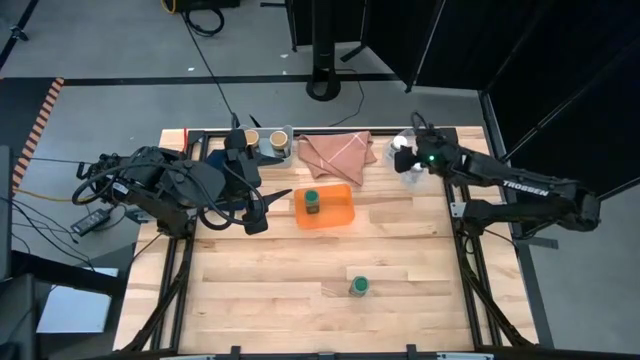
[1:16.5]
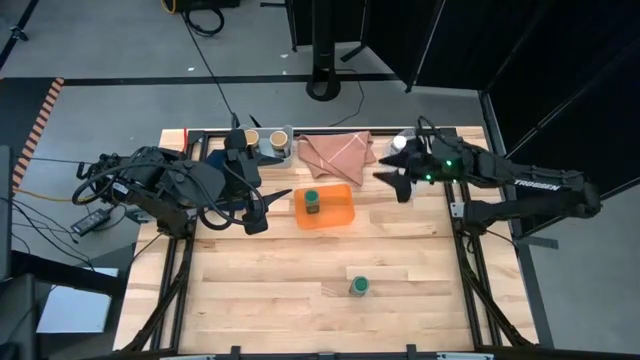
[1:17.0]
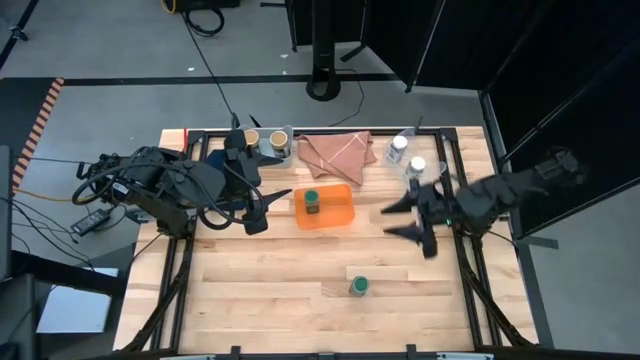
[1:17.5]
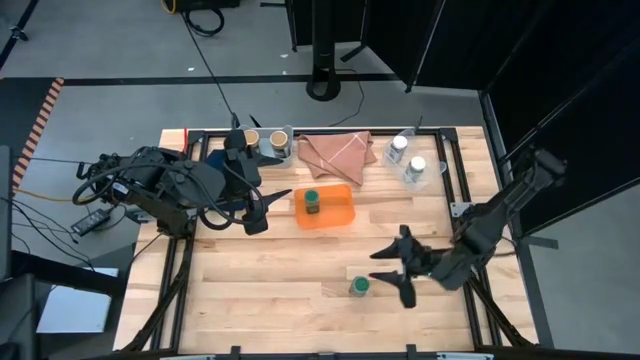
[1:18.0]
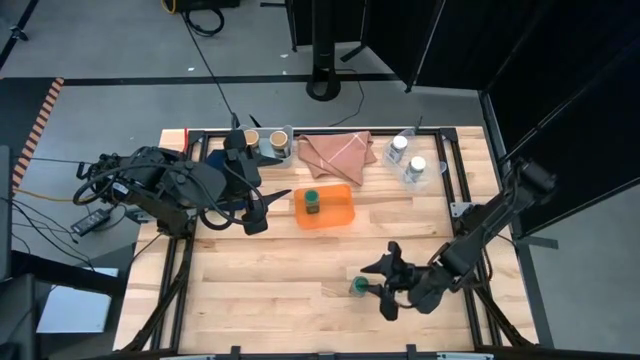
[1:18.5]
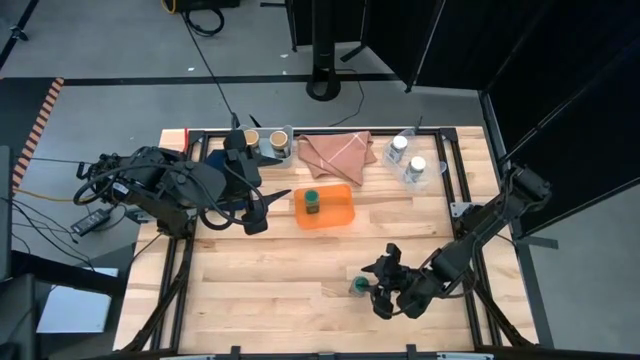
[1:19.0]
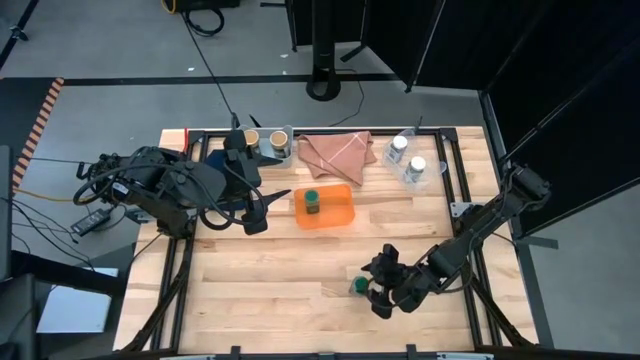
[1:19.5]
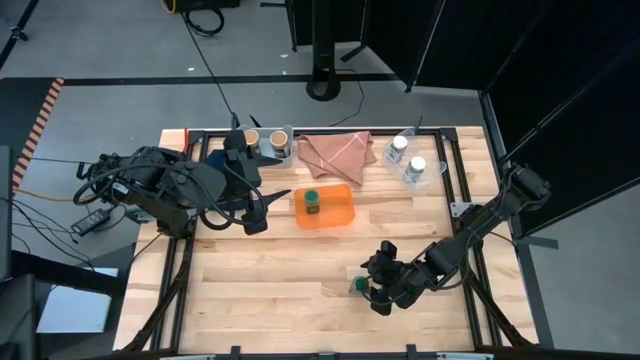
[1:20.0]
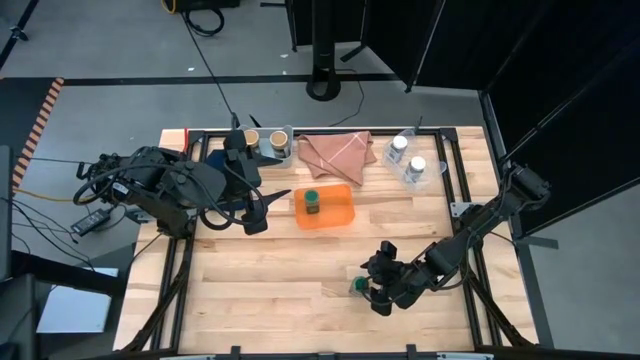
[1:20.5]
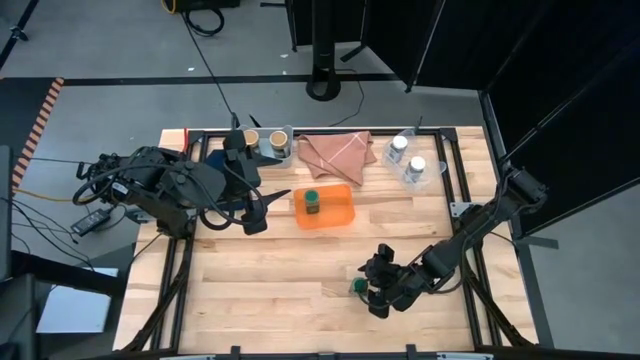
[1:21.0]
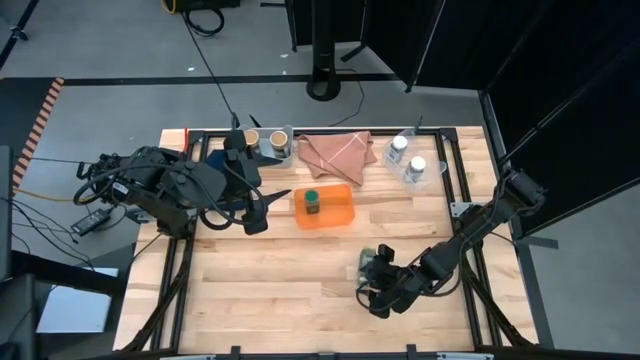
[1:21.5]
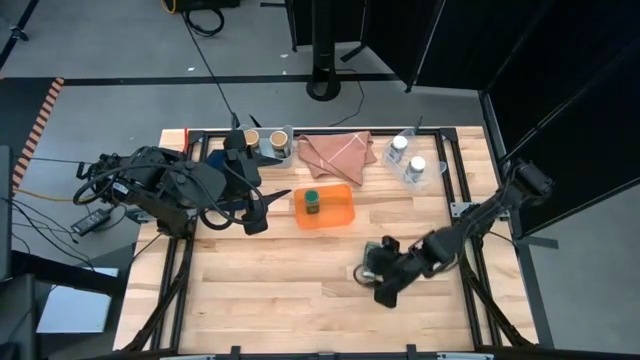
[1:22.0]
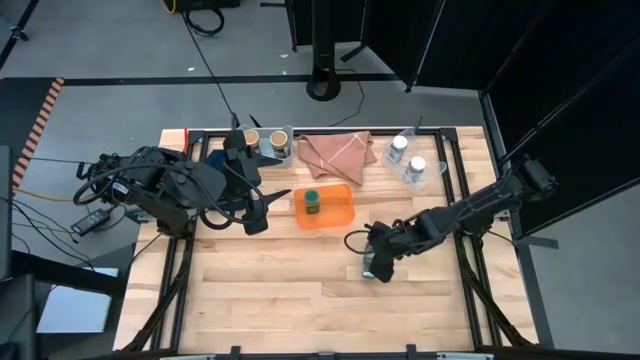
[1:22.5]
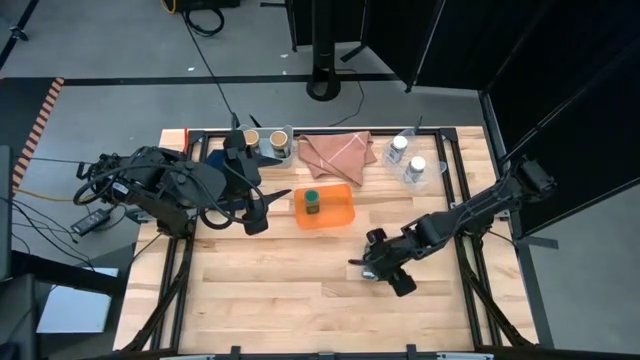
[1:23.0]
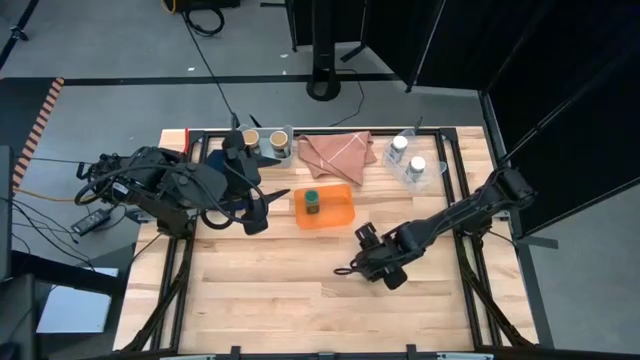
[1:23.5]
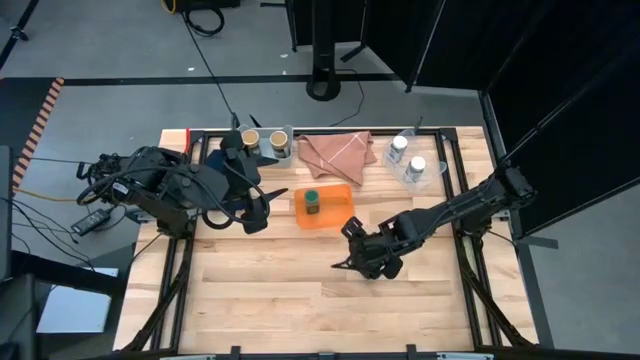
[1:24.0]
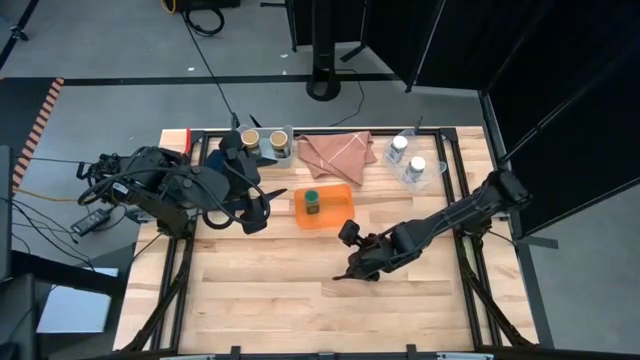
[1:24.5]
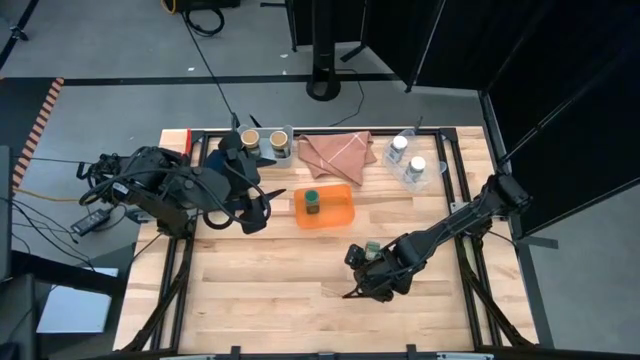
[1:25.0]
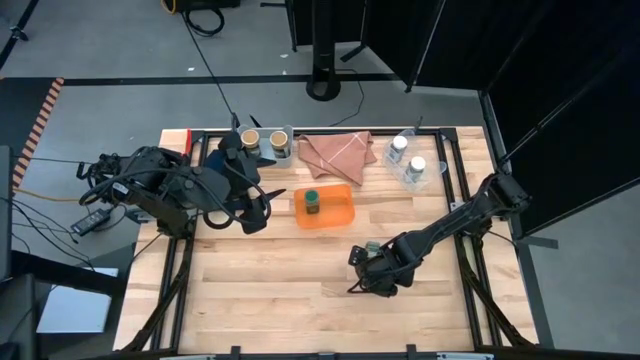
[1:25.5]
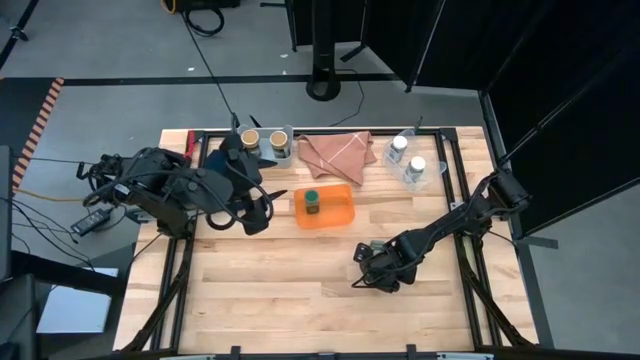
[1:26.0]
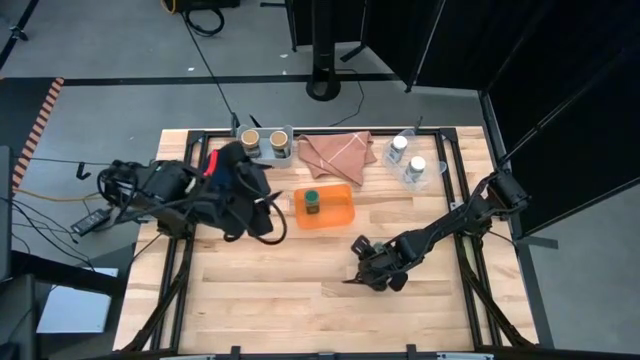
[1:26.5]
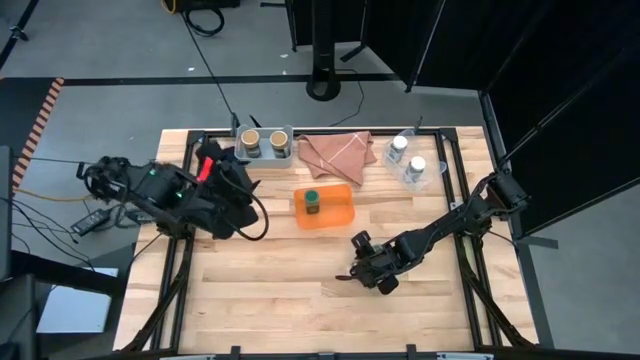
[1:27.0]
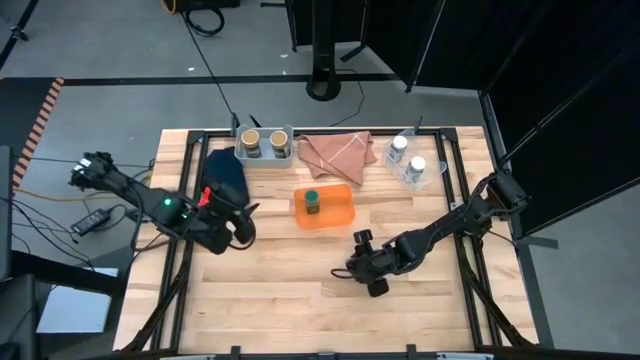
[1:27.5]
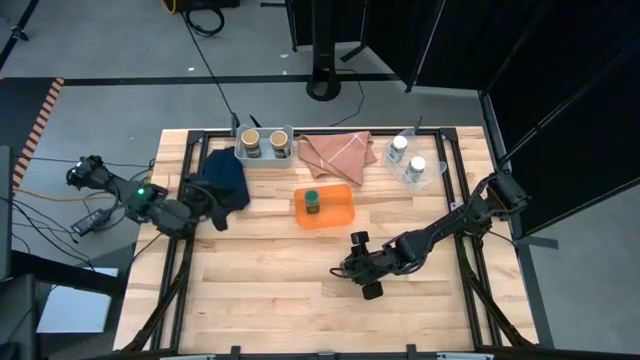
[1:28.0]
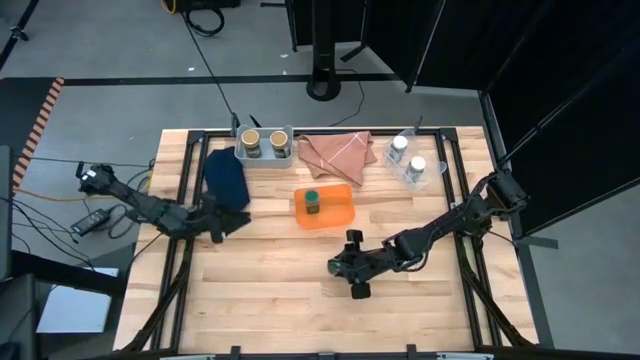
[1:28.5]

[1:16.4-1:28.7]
Task: Sort spices by type
Put the green seasoning bottle into the orange bin

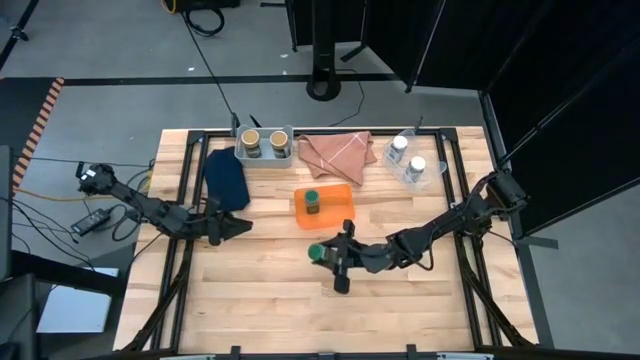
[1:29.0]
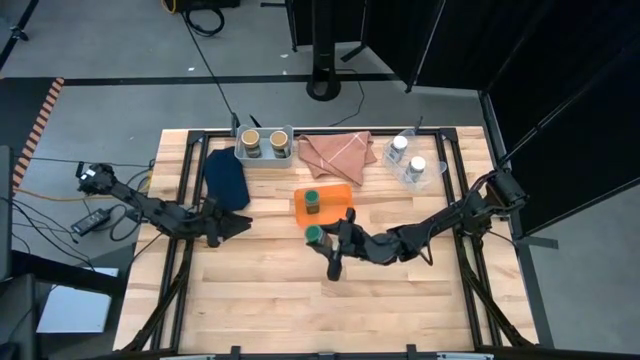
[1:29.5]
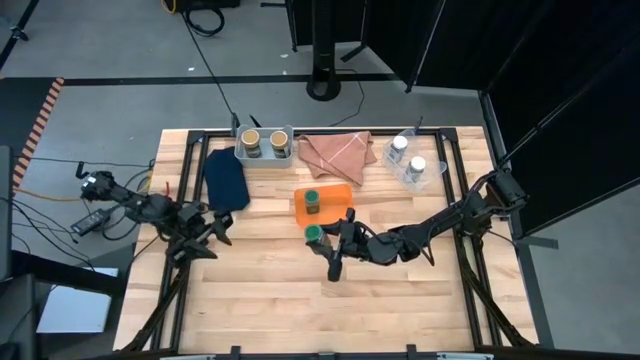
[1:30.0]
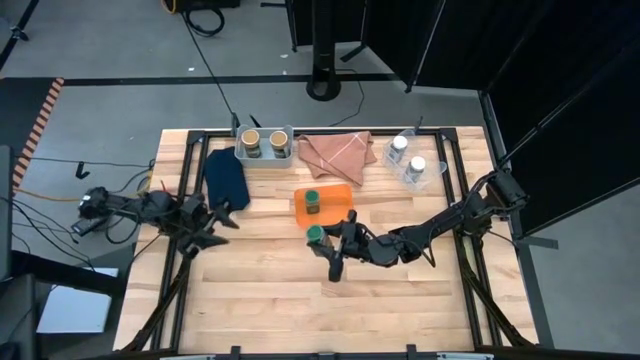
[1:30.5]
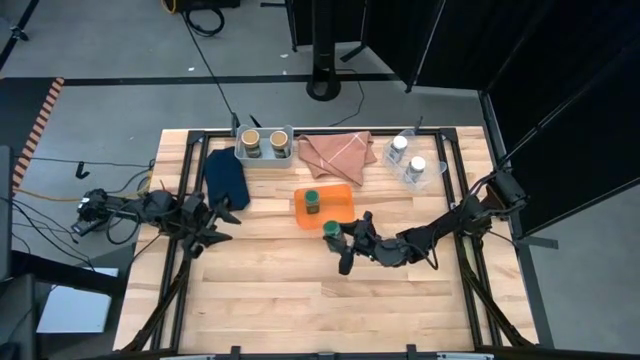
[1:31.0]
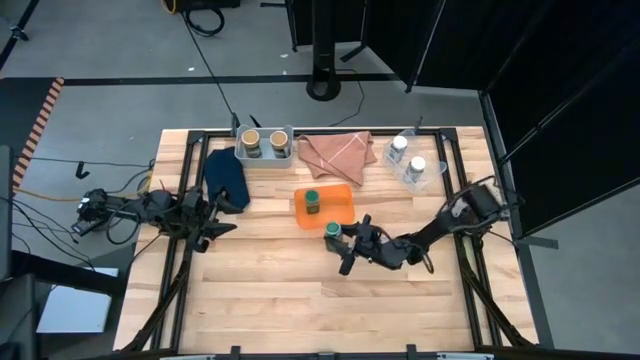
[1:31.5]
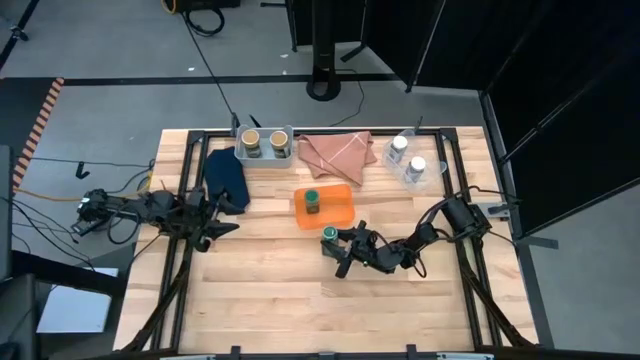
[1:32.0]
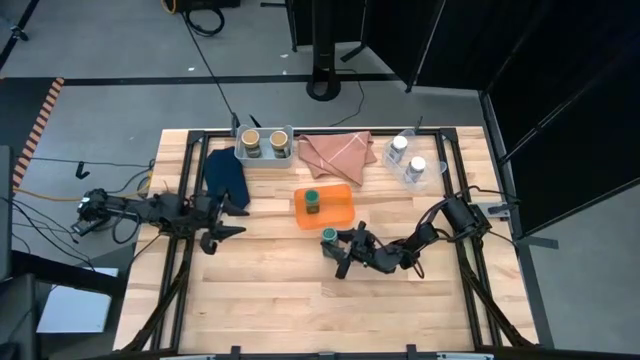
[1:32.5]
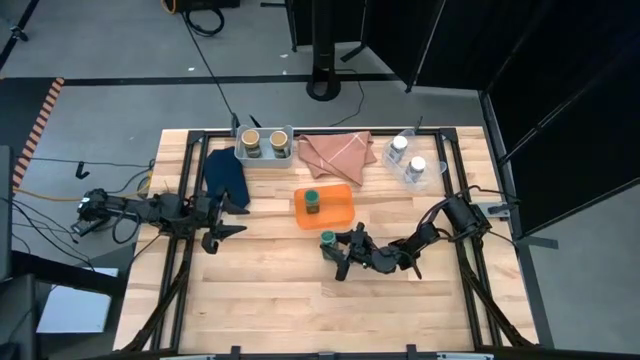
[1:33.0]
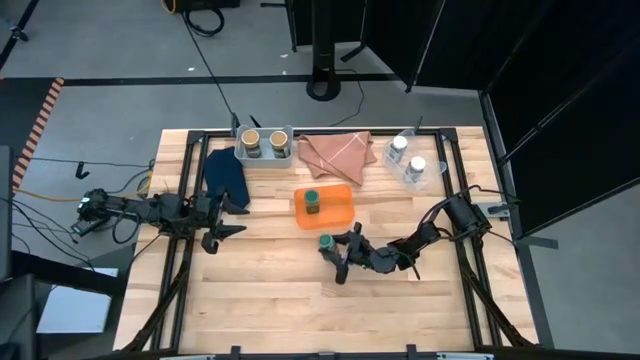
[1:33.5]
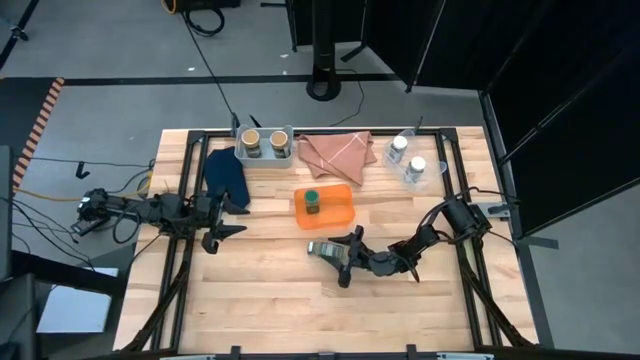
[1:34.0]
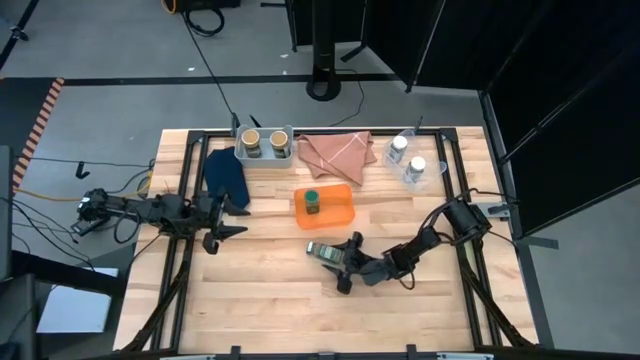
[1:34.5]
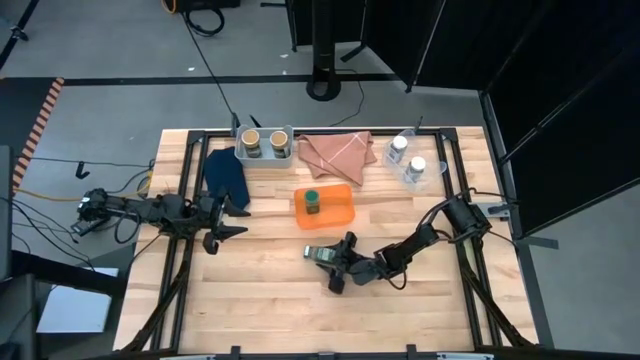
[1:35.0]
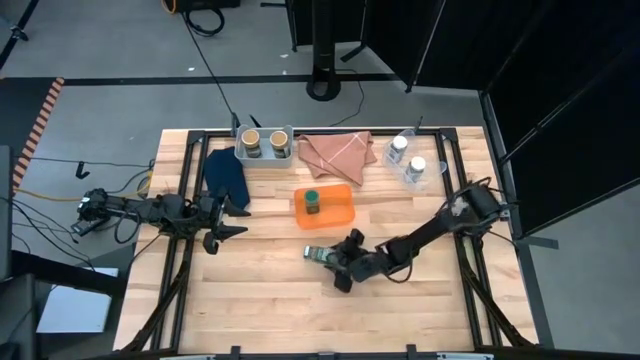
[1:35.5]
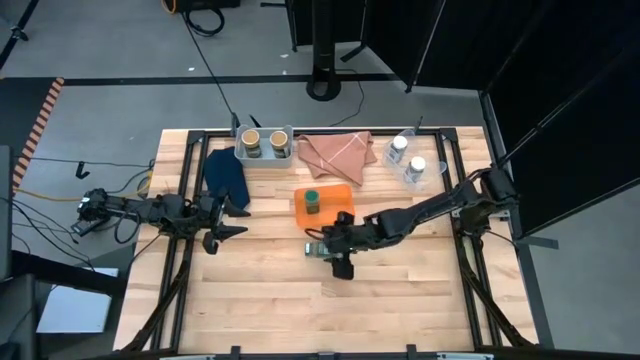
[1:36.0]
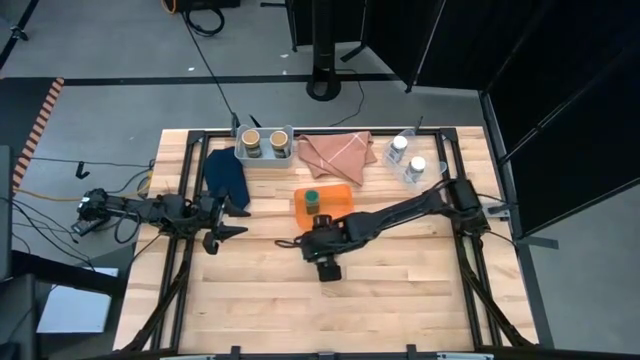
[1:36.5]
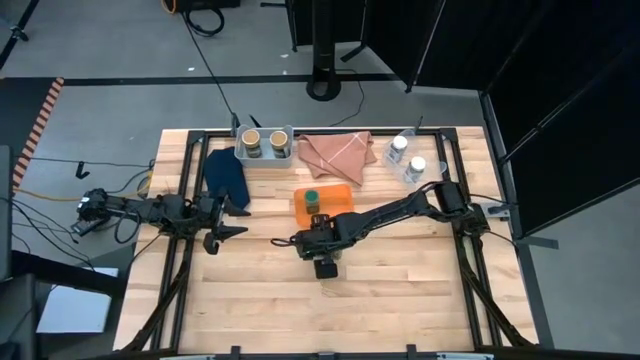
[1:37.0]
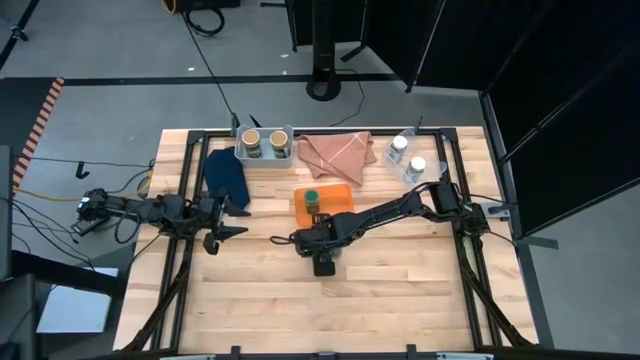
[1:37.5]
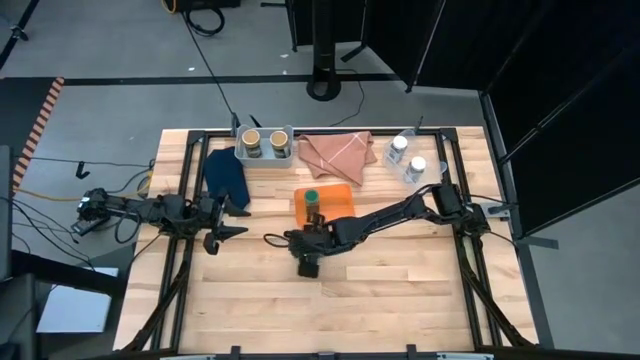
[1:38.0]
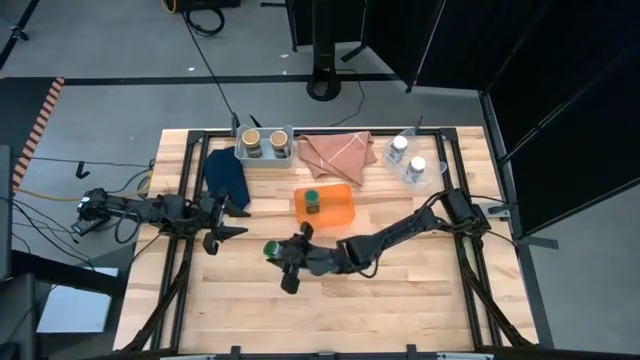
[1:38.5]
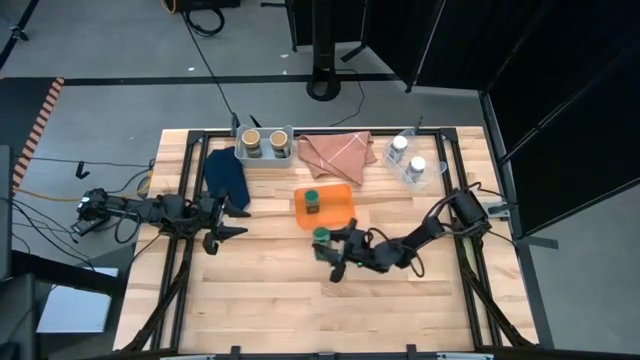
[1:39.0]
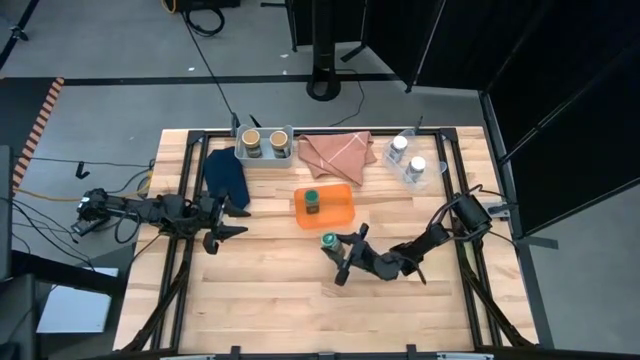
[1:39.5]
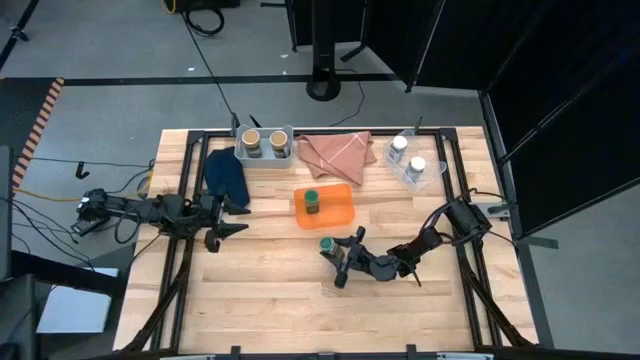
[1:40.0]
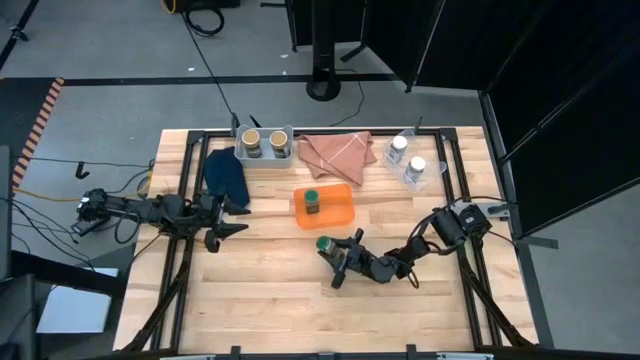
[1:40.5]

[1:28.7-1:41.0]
Put the green seasoning bottle into the orange bin
